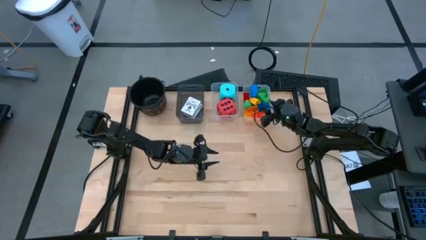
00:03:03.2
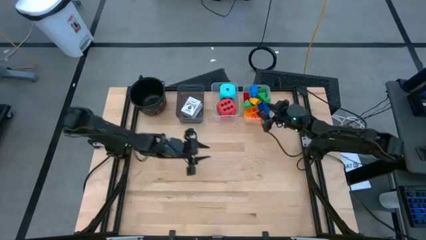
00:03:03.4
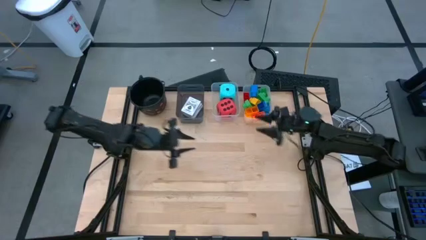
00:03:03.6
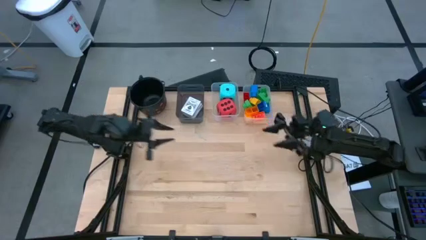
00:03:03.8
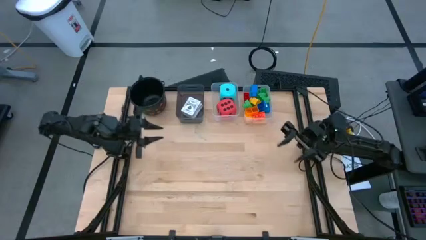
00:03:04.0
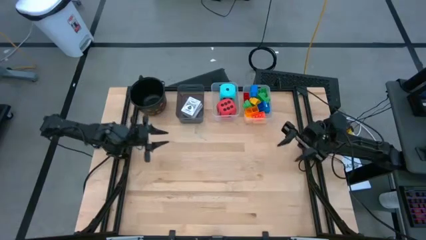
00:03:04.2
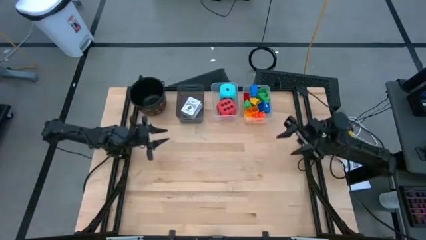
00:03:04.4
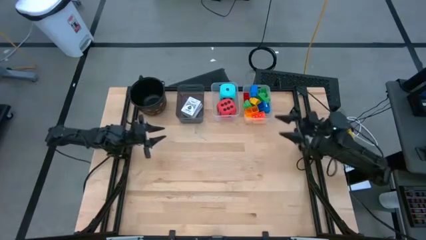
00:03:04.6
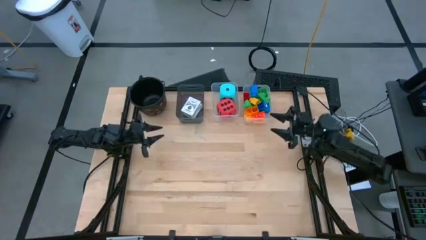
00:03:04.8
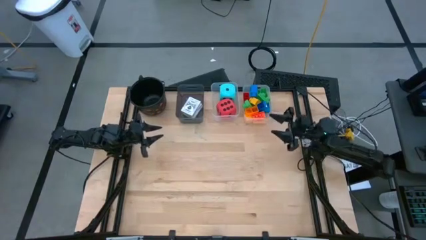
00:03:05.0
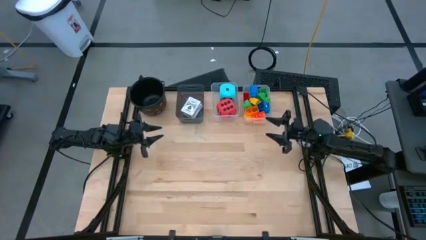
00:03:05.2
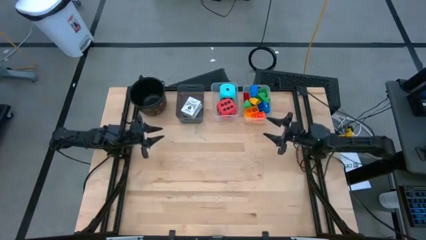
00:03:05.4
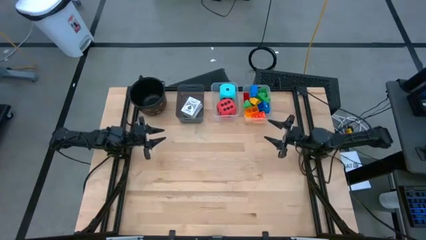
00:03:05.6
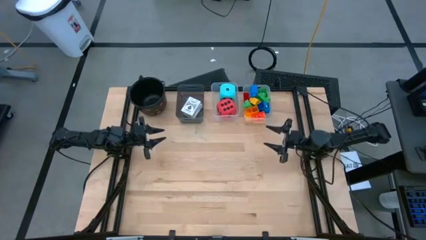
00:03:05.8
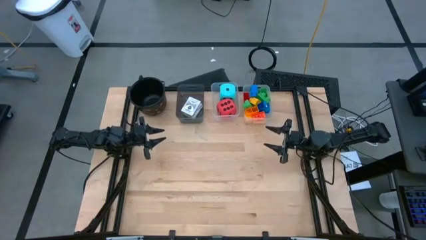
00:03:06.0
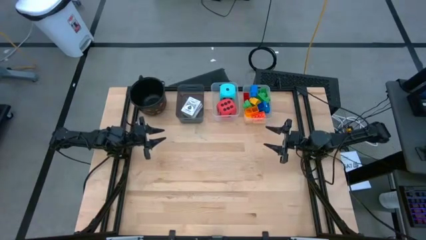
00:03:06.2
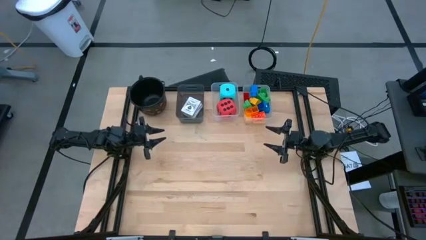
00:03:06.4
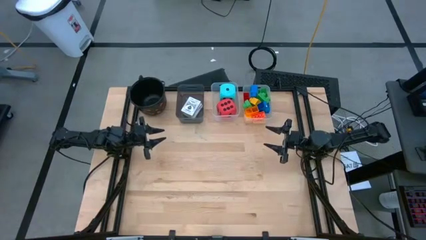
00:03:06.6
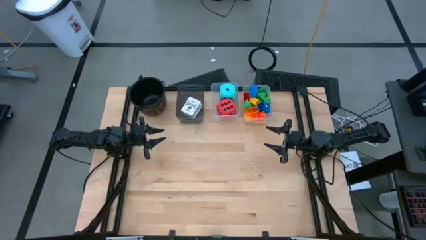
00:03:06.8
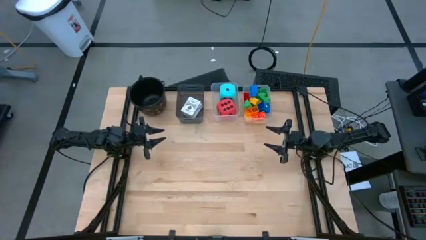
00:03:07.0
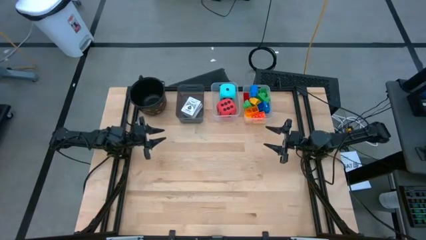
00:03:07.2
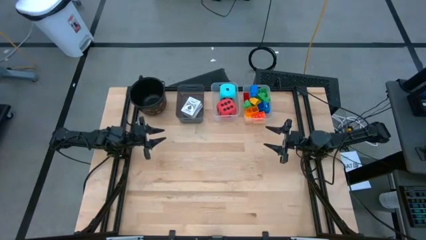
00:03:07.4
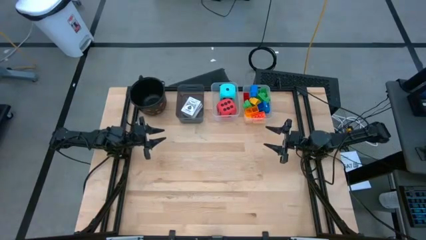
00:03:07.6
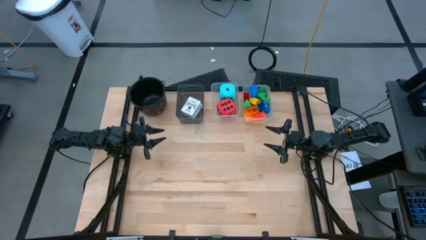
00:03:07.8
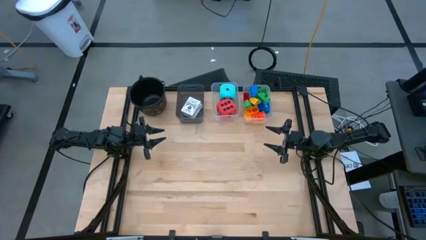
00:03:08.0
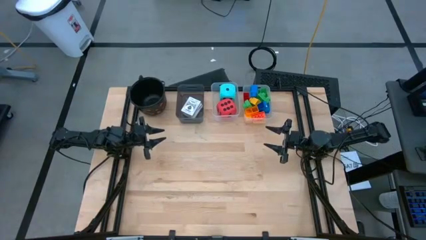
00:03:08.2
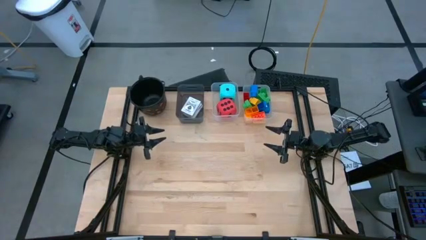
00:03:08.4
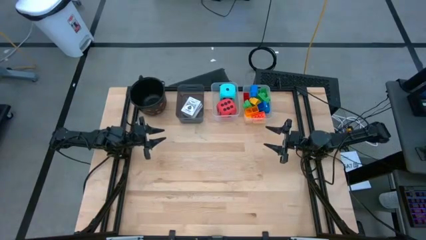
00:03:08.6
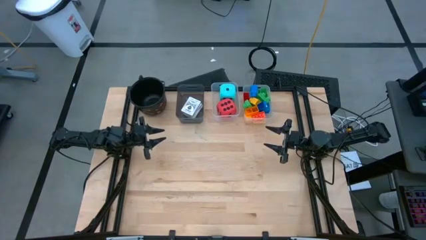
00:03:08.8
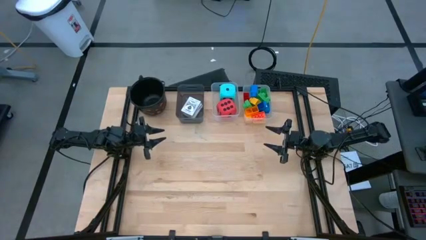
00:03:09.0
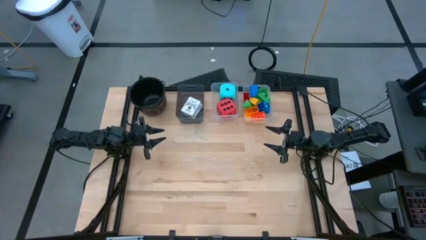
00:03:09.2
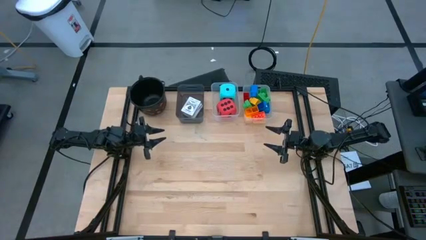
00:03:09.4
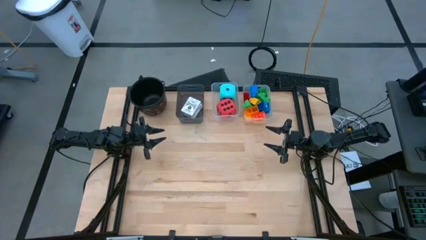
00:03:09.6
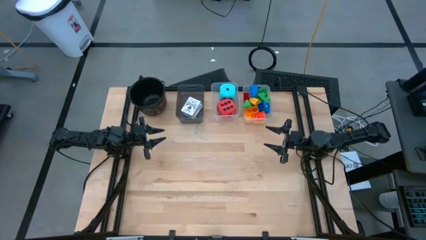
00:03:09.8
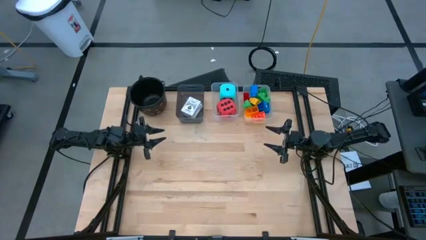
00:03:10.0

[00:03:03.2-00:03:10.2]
Task: Pick & Place Toys
Return to Home Position

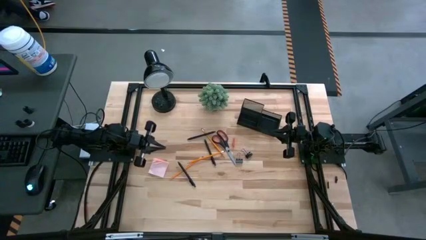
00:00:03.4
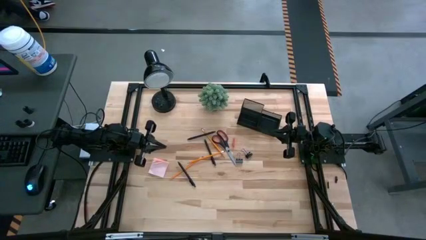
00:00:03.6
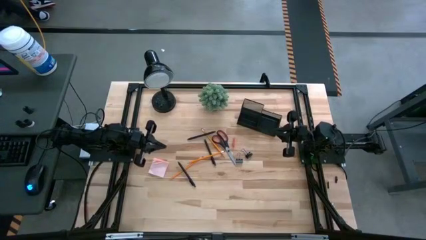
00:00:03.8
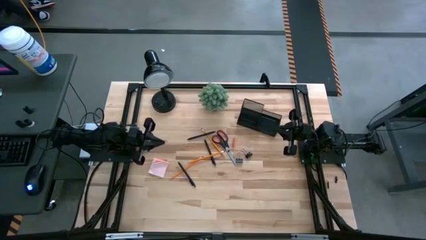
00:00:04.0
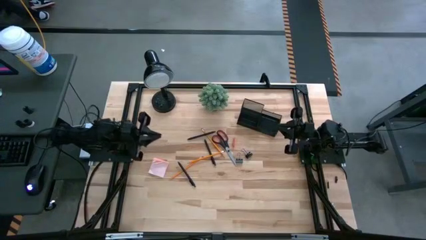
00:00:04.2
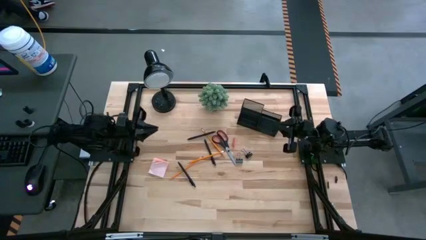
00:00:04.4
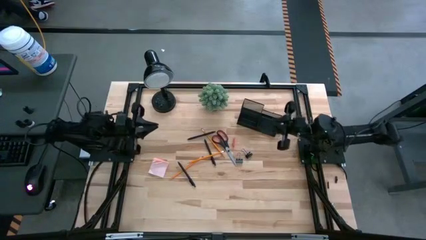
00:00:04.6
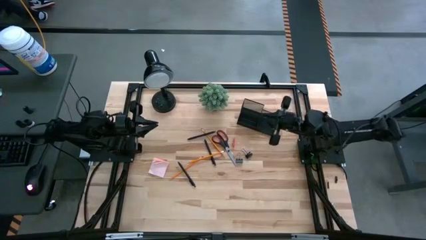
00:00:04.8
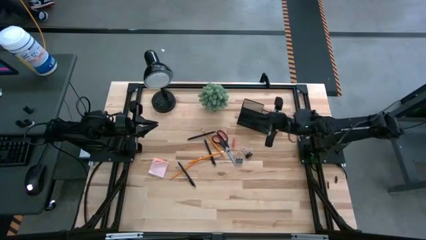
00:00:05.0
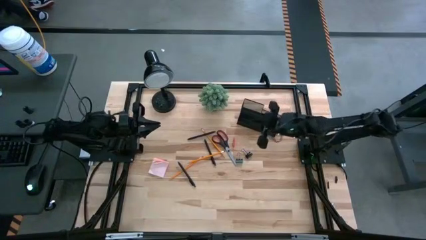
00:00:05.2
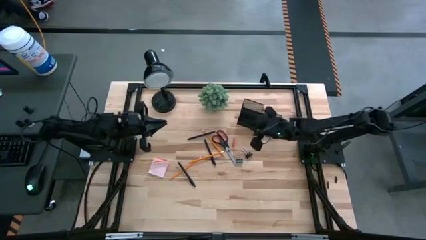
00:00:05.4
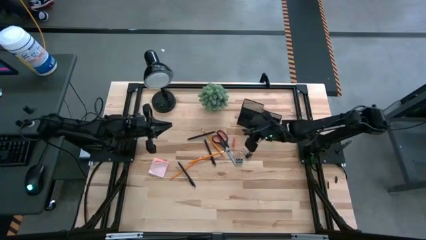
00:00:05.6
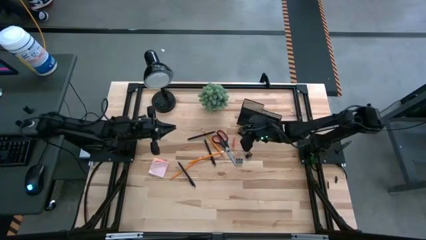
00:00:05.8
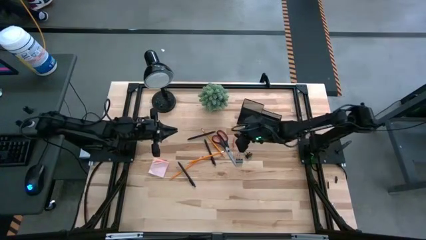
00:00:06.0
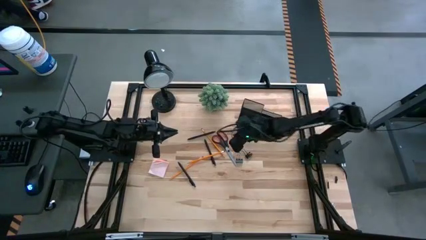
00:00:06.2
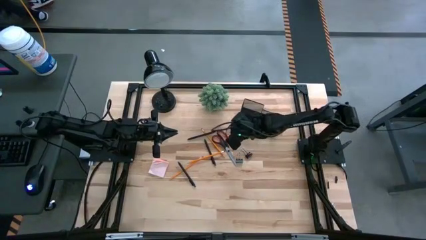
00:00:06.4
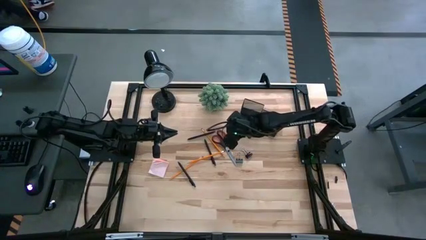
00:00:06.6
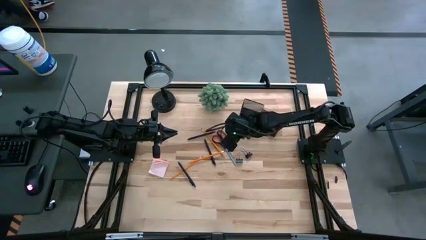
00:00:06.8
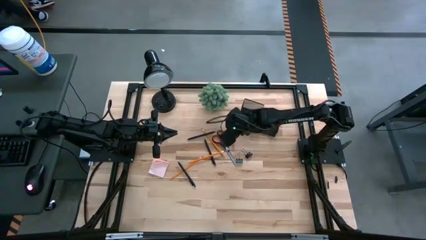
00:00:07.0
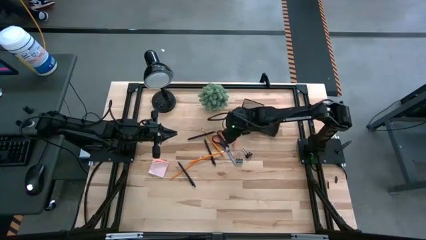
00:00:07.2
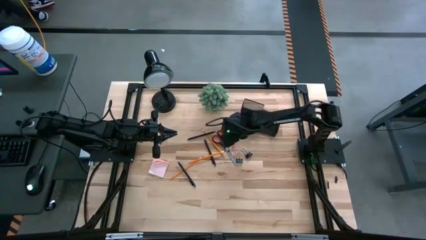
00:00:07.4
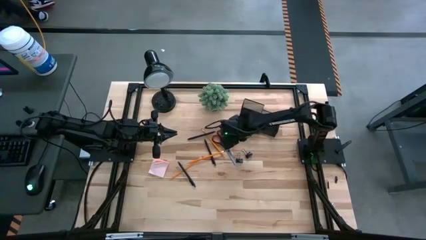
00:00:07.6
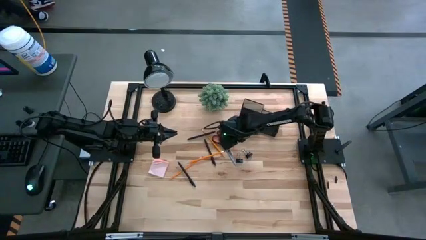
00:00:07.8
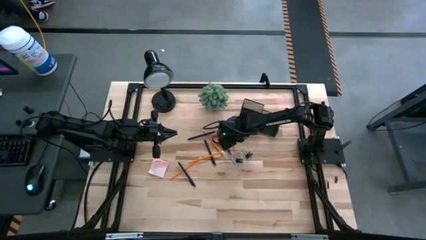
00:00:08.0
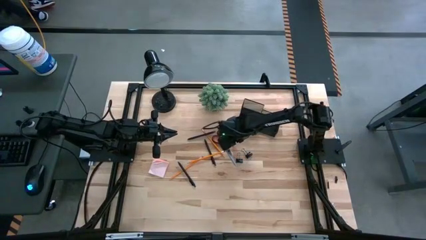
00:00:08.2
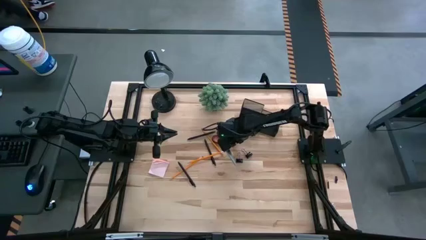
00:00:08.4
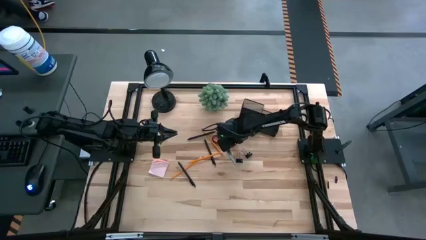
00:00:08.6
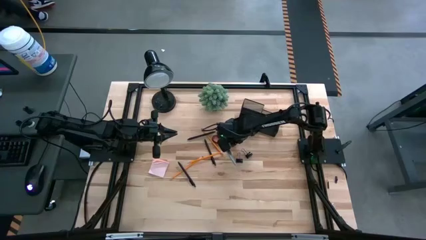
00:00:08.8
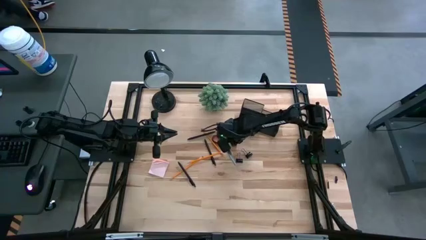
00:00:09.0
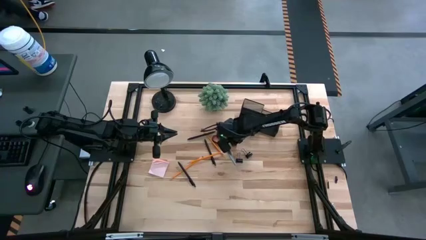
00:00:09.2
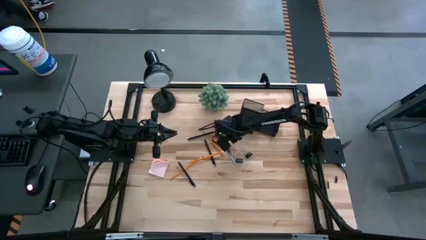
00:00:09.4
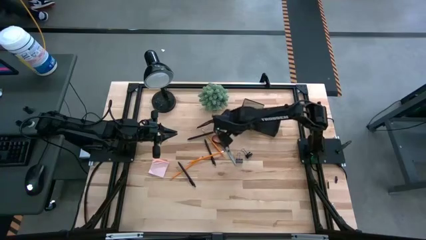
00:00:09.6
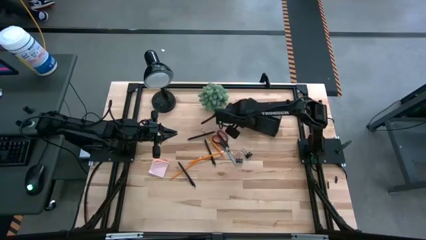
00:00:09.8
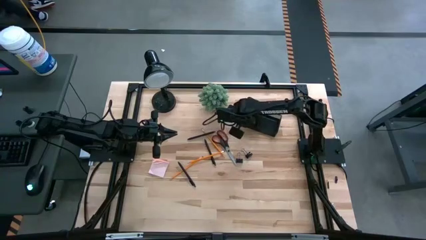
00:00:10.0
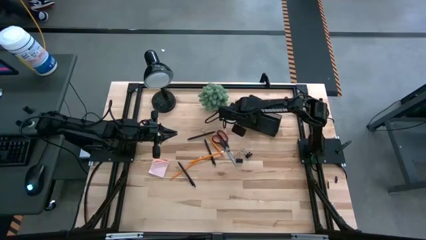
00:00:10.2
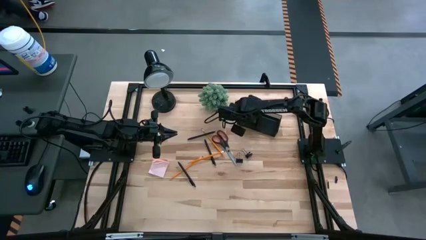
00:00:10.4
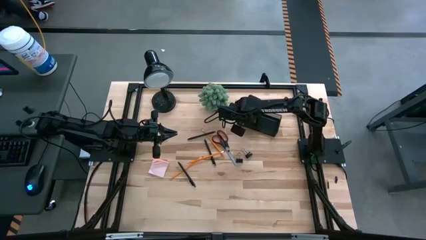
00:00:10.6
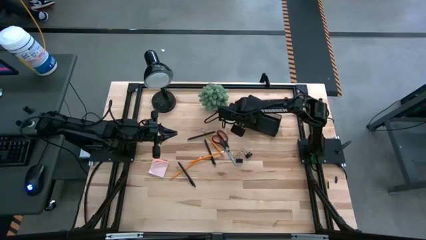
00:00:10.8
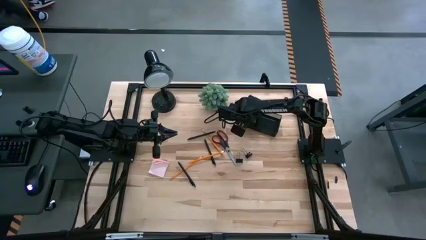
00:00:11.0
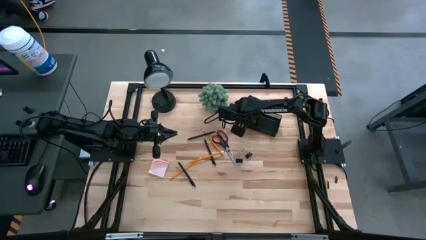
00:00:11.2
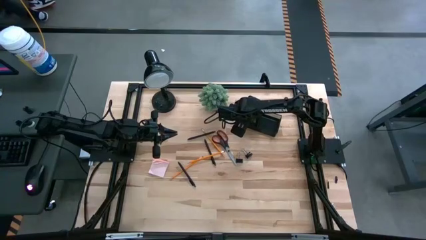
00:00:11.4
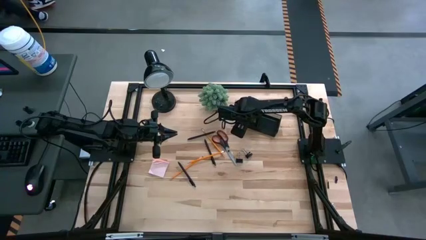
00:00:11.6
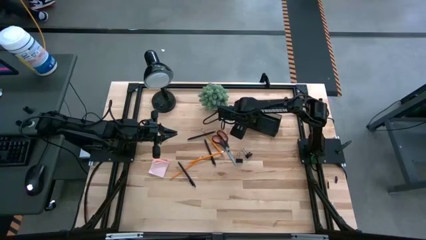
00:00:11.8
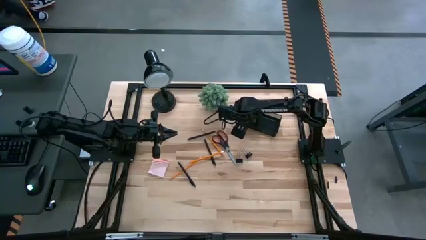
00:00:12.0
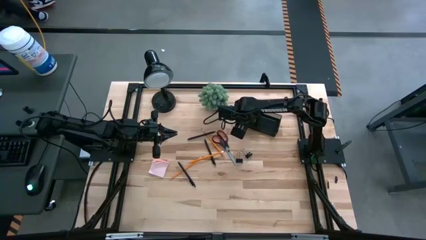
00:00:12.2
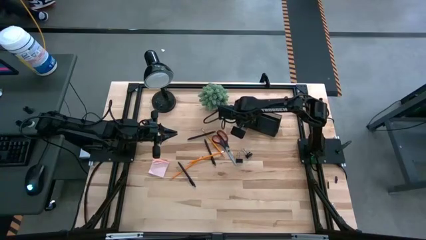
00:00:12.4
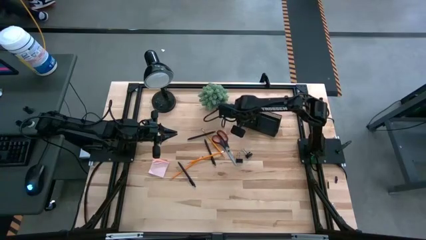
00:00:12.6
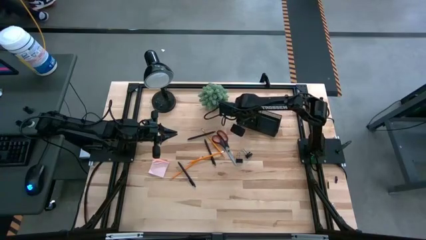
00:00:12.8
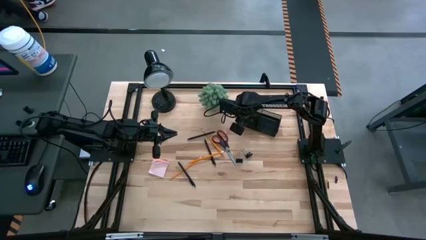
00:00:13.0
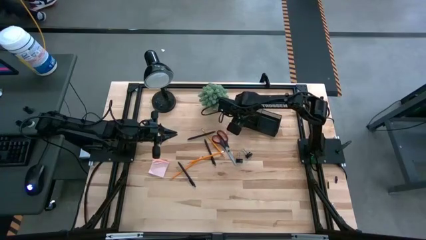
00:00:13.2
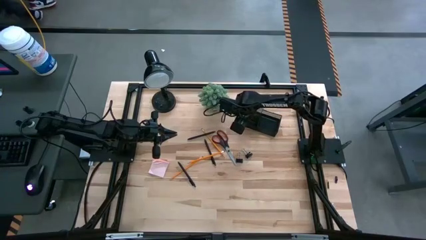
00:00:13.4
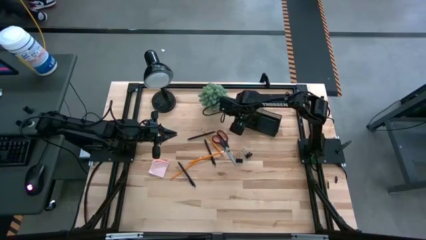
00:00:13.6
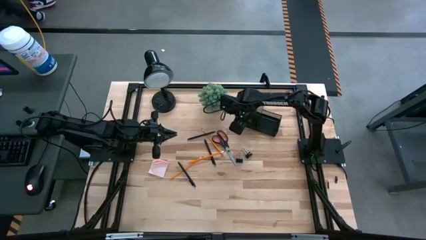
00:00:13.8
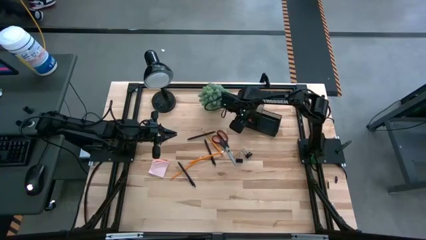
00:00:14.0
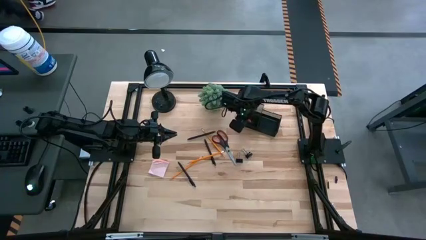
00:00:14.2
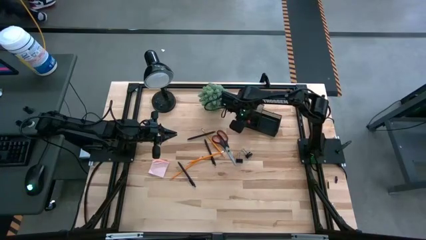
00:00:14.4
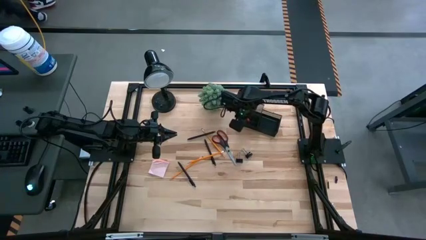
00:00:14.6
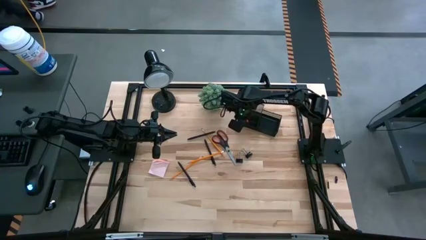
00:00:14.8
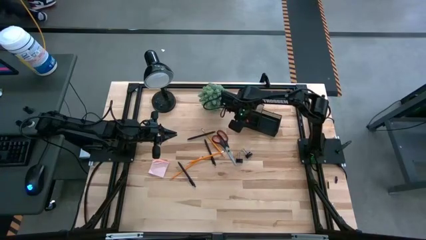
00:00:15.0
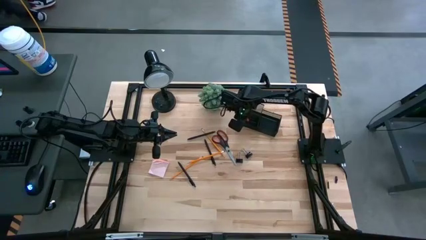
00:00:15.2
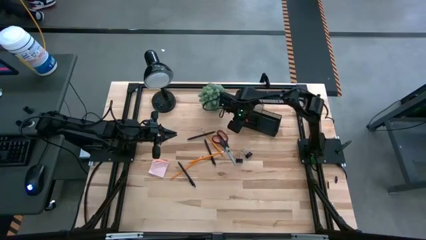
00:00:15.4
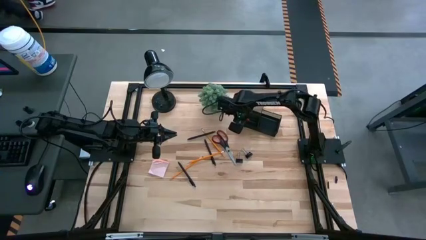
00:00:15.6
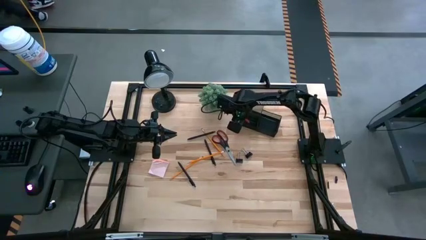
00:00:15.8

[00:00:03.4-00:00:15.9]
Task: Pick and place office supplies into organizer
Put the orange eraser into the black desk organizer
